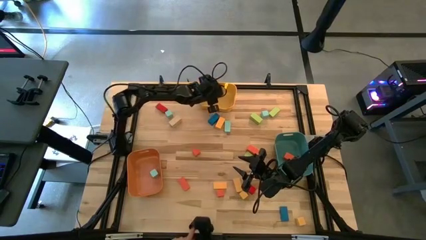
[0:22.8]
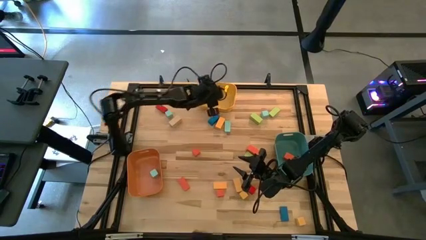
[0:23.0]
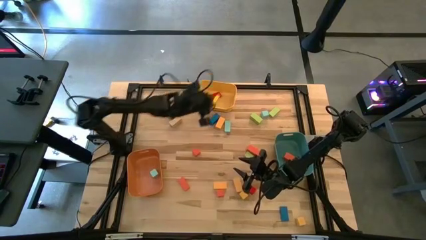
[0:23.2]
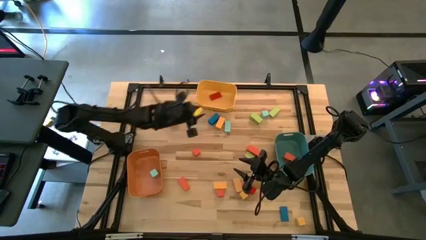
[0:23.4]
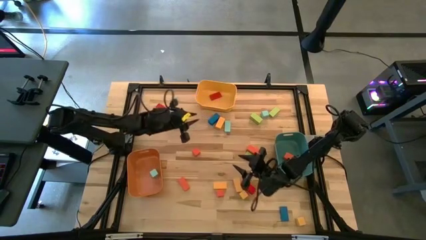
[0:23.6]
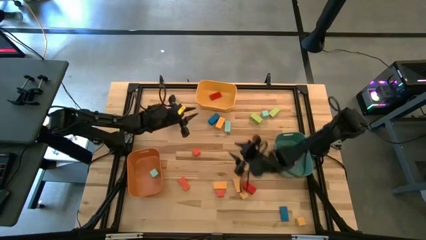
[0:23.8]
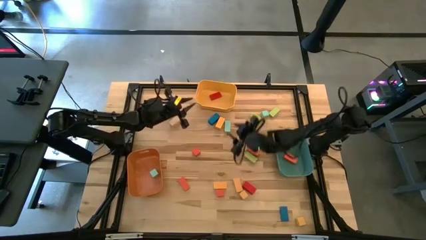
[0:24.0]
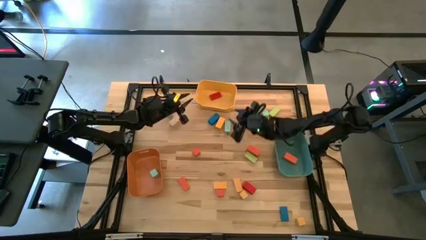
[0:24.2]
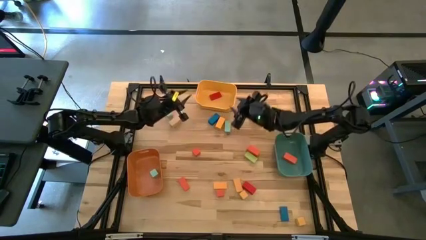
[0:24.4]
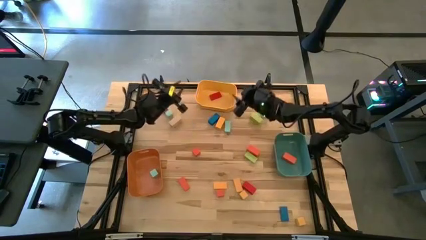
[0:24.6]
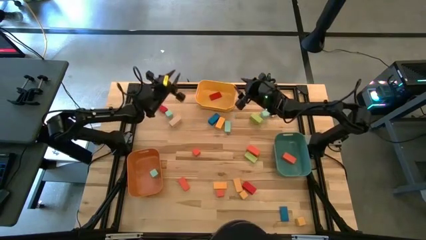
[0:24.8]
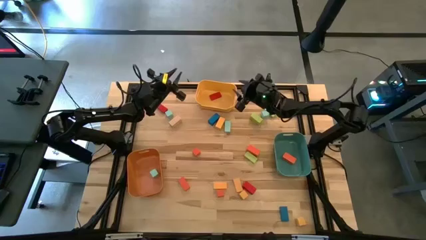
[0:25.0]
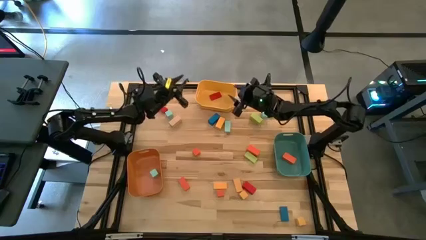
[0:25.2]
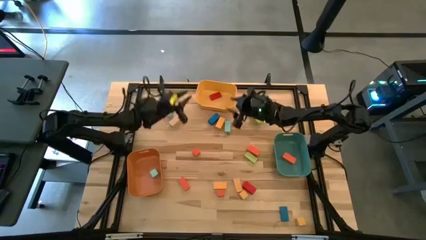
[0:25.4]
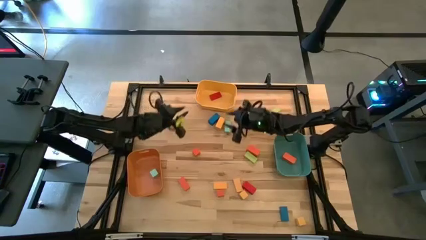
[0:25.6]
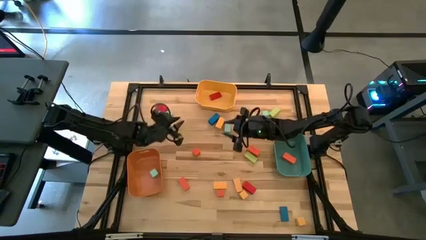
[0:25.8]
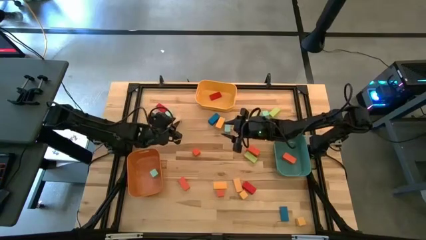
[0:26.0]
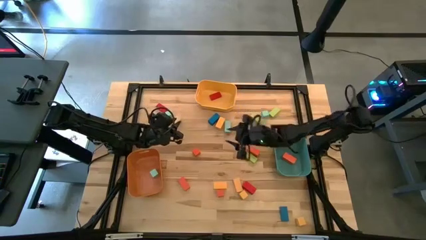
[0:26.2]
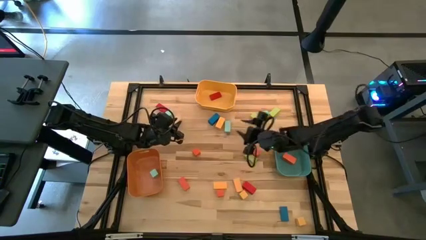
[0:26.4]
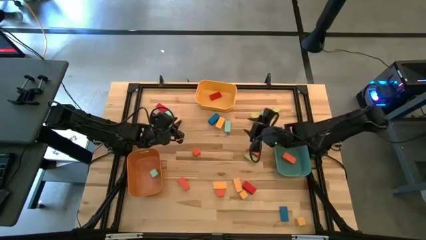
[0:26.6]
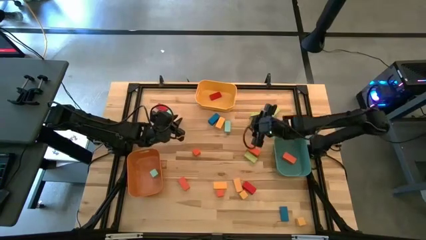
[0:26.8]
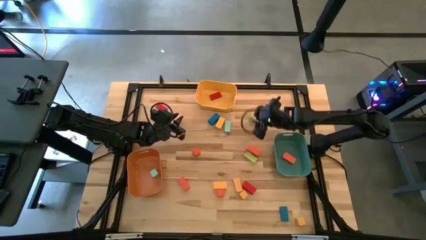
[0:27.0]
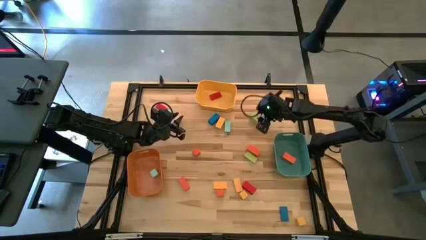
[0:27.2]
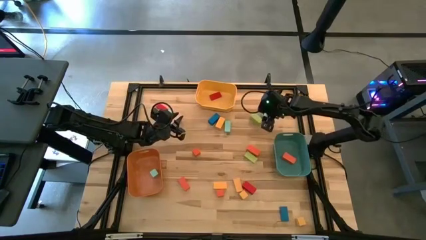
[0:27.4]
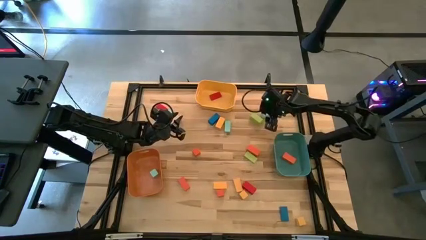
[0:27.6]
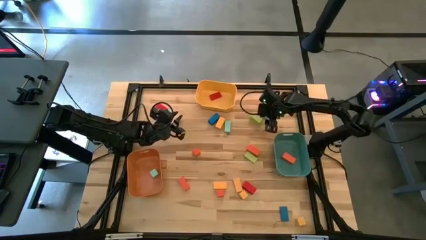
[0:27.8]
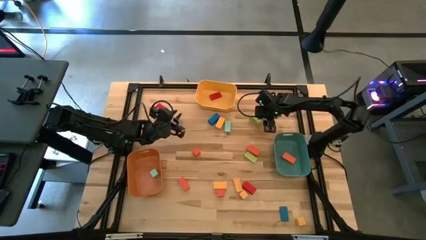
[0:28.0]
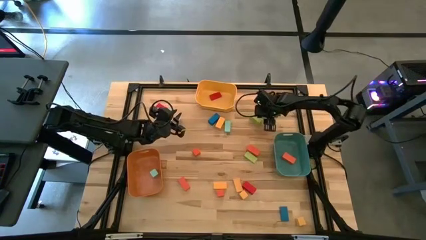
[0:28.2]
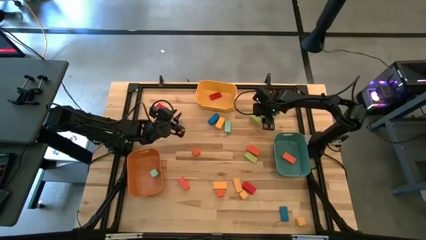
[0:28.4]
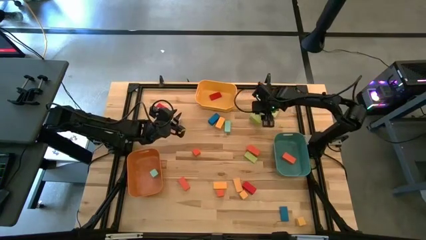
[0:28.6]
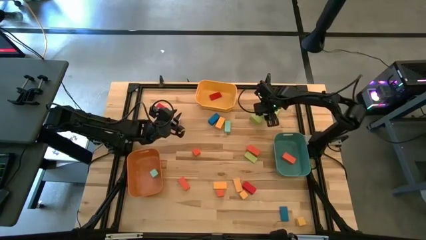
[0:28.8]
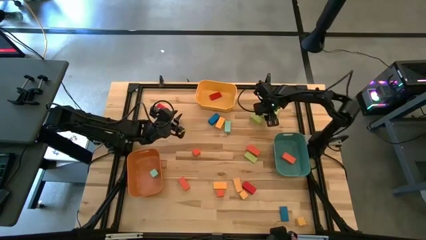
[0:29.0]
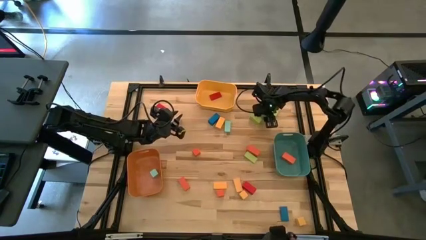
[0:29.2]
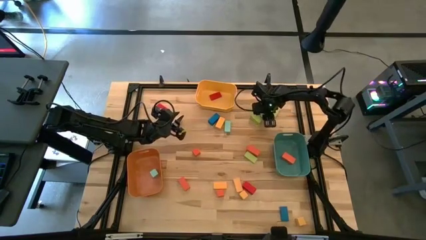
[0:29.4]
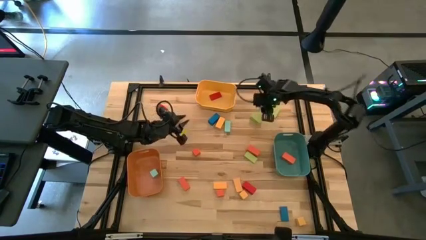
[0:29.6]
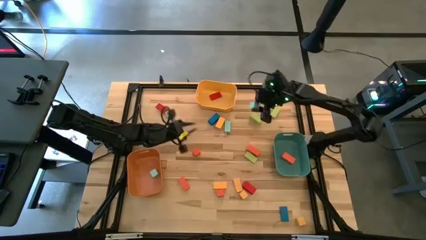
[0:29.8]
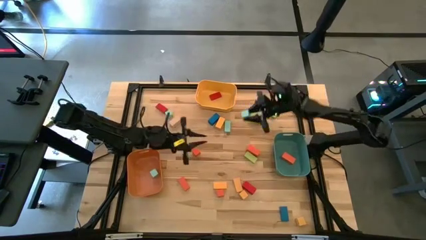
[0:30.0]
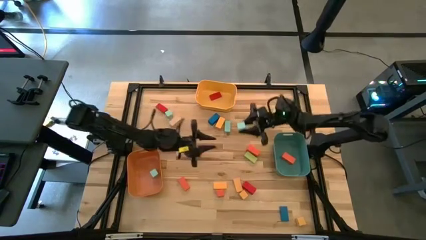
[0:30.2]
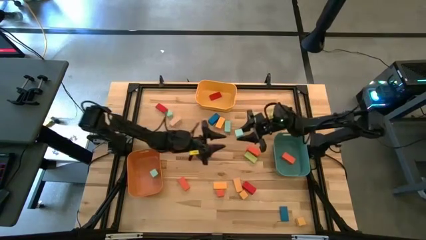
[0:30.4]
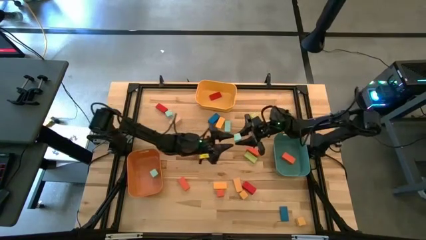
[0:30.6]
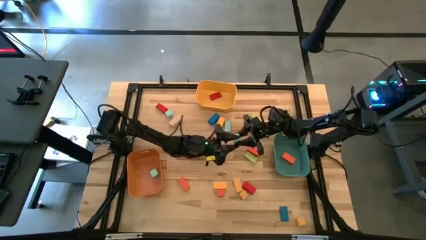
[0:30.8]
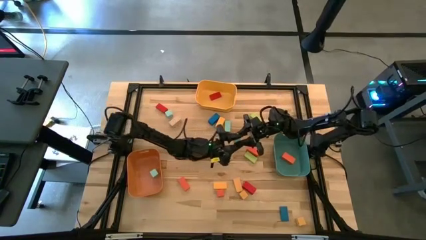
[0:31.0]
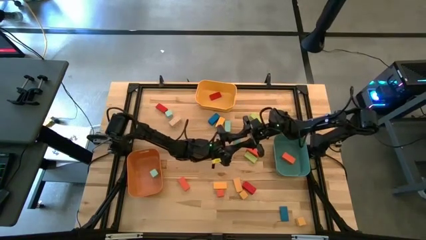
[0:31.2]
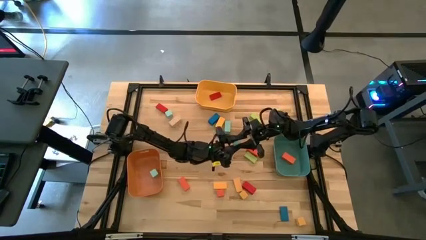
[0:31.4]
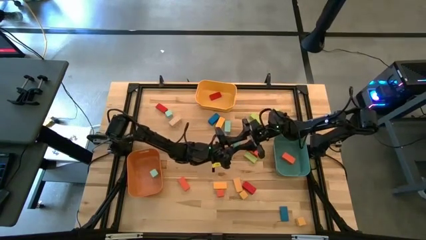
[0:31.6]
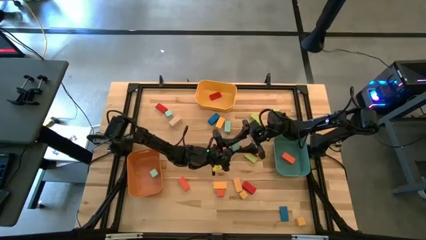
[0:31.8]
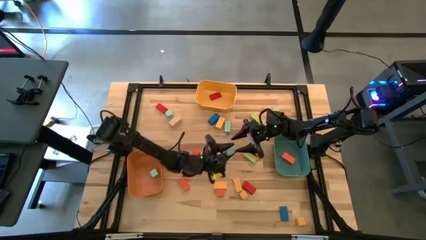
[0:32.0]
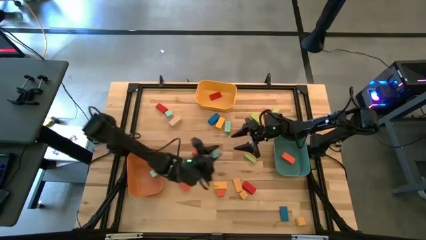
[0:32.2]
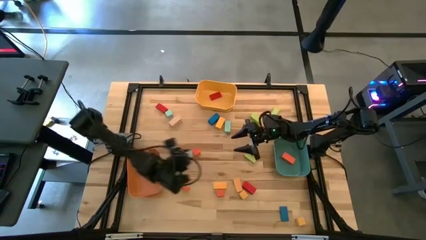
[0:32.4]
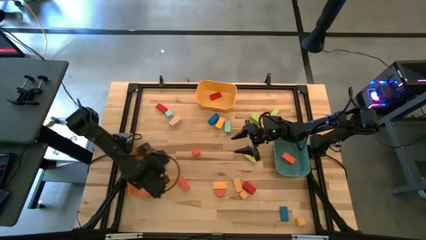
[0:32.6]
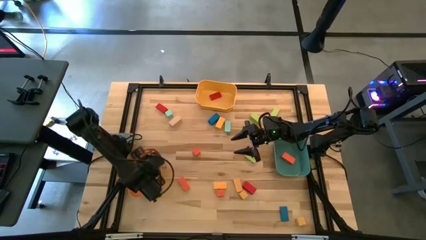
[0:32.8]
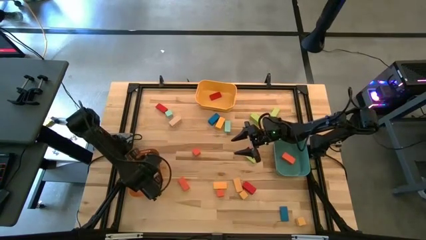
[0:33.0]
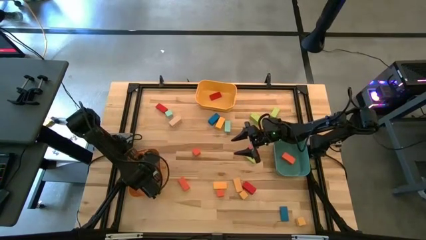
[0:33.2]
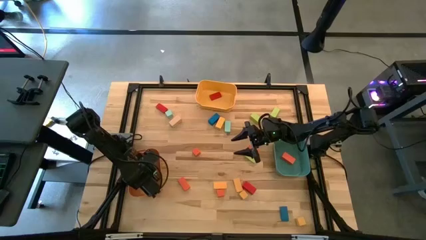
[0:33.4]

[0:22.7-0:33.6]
Task: Sort blocks by size
Put the light blue square block into the orange bin

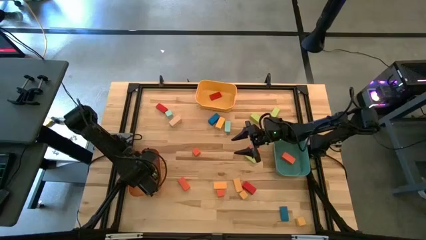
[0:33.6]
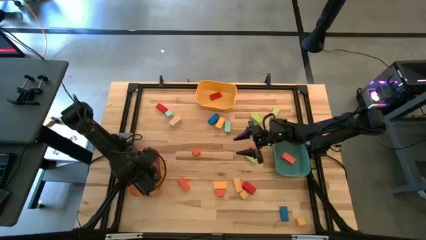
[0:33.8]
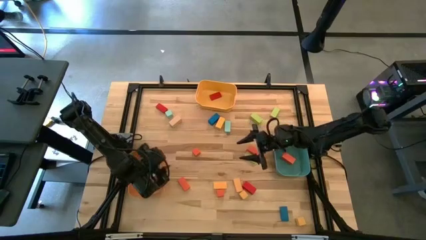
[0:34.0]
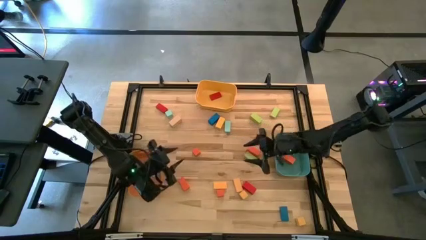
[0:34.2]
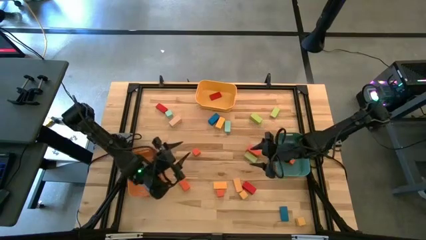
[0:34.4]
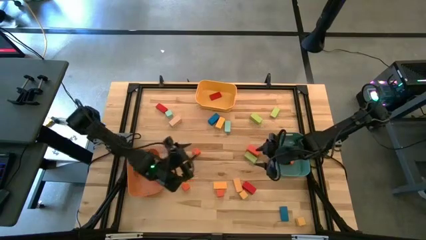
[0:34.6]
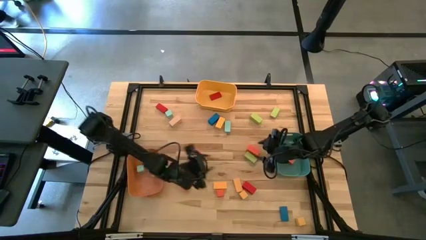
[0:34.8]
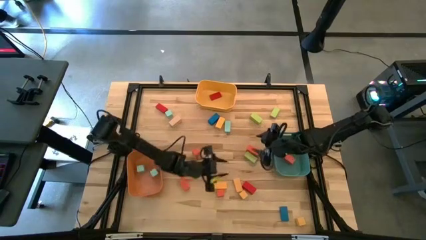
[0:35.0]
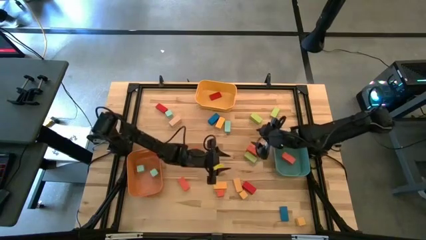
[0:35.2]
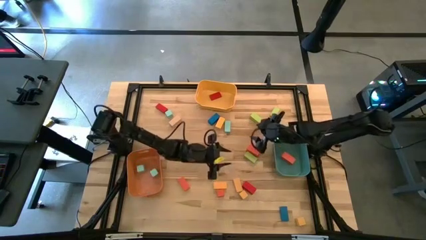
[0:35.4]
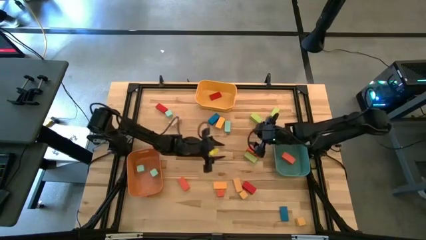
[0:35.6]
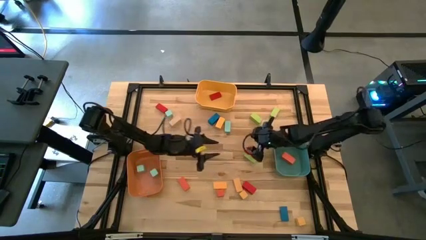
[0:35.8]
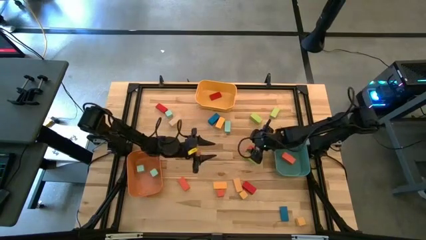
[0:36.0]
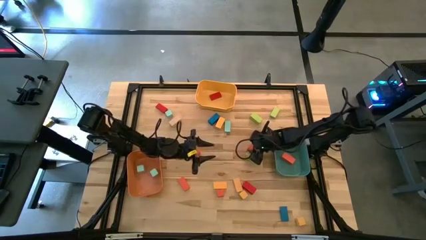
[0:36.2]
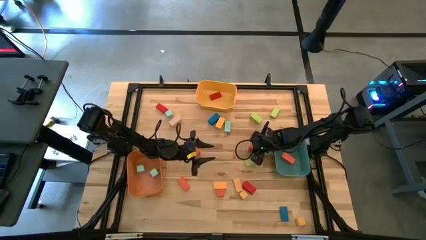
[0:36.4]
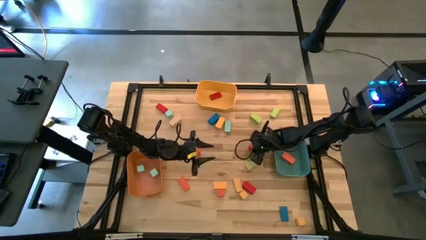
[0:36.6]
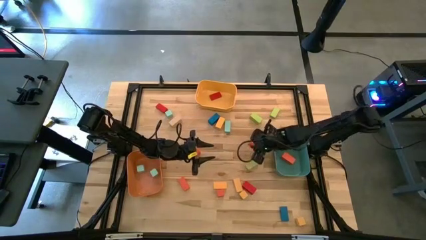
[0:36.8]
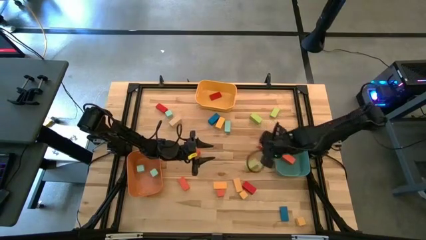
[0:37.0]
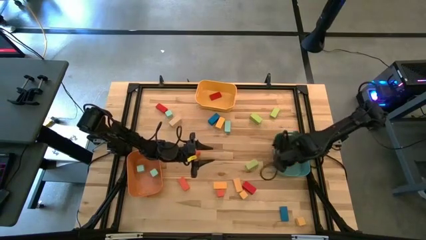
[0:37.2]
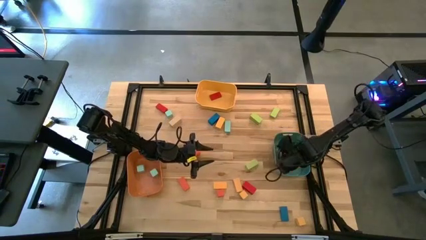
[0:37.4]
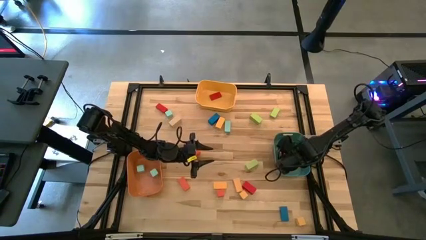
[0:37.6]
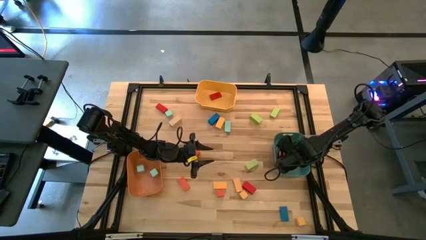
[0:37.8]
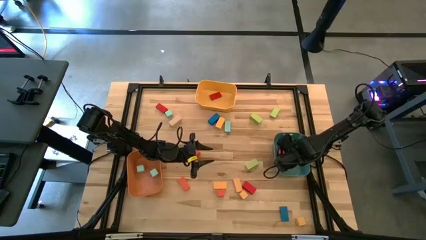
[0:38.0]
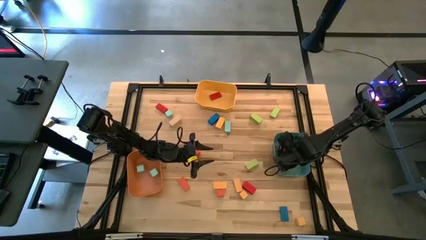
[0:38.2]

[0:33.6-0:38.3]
Put the thick orange rectangular block into the green bin

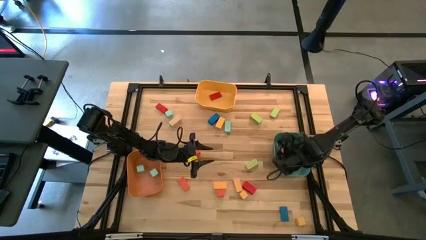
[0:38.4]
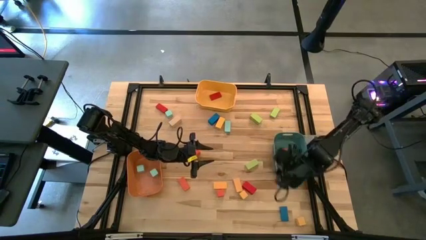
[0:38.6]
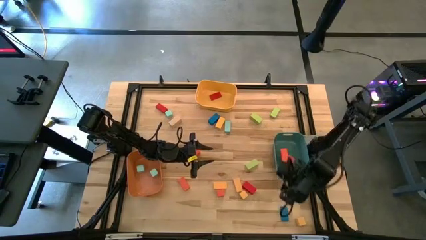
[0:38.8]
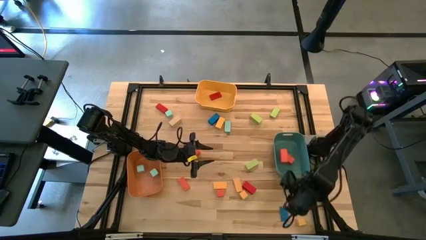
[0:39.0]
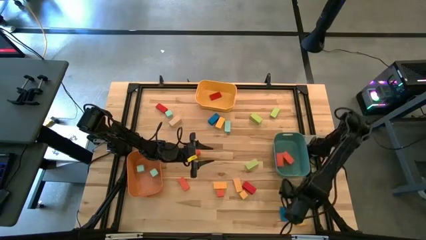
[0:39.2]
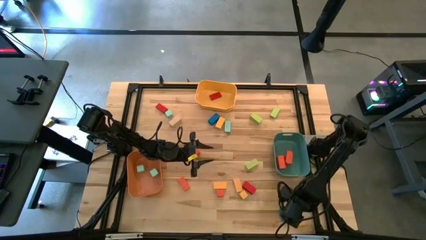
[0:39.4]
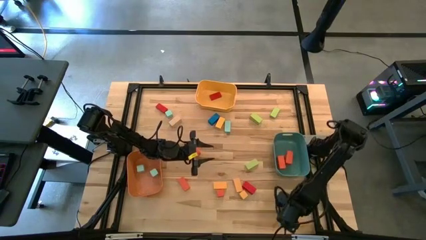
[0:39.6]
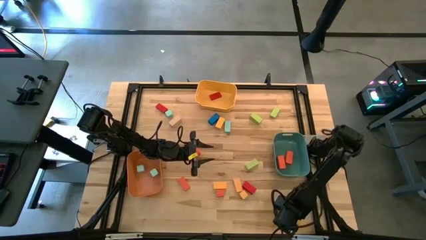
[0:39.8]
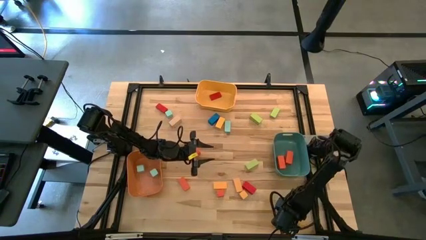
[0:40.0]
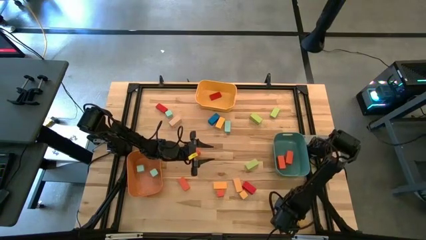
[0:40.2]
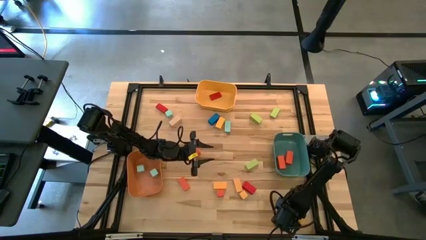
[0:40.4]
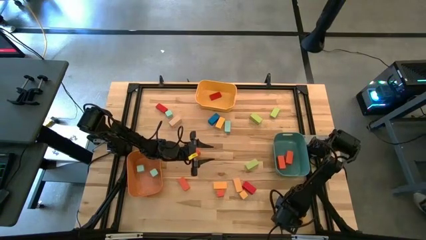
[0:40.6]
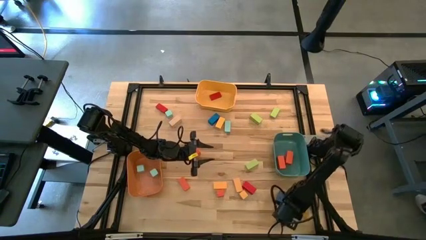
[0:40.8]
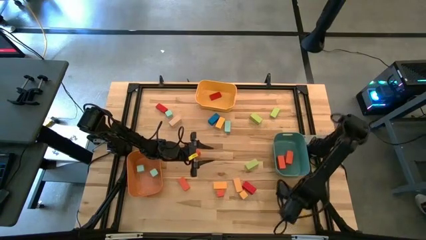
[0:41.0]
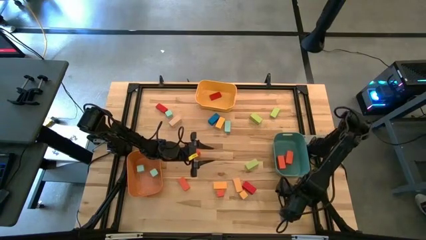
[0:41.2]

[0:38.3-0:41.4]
Put the yellow square block into the orange bin
